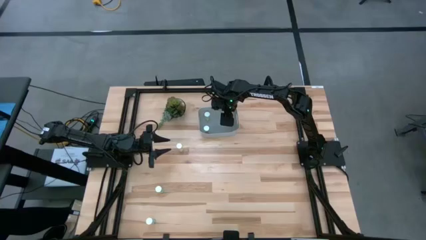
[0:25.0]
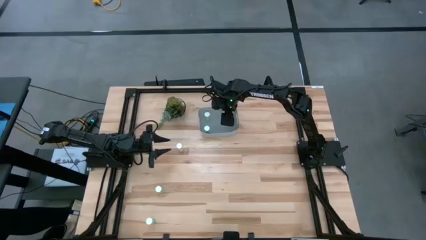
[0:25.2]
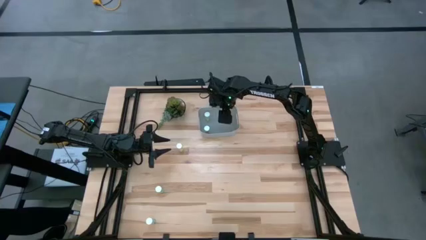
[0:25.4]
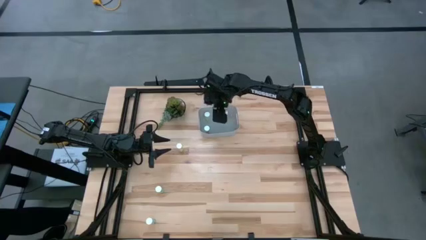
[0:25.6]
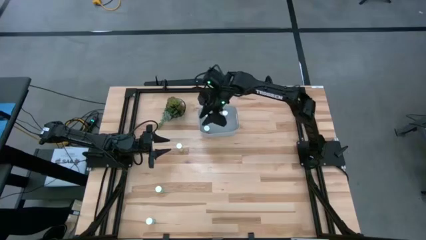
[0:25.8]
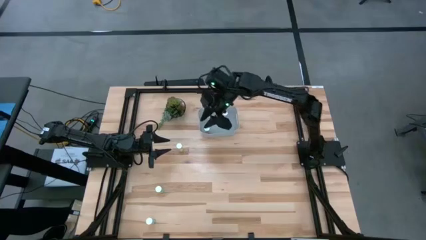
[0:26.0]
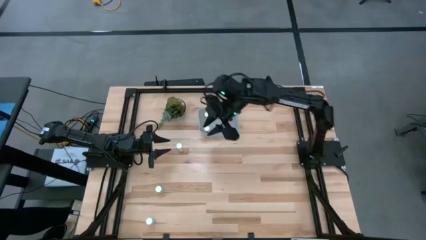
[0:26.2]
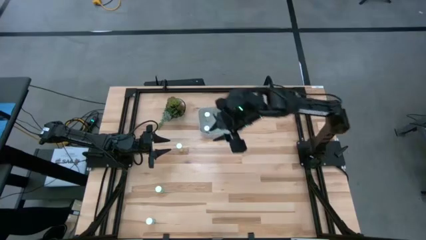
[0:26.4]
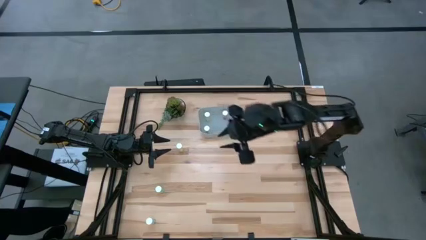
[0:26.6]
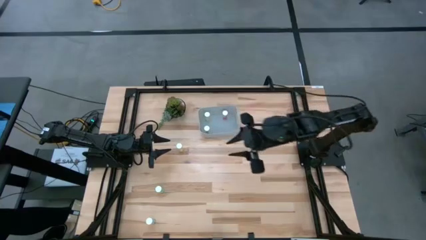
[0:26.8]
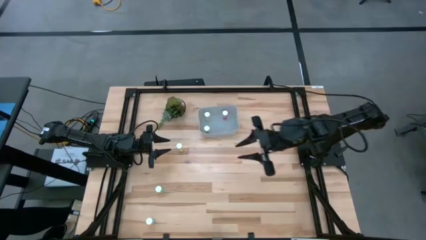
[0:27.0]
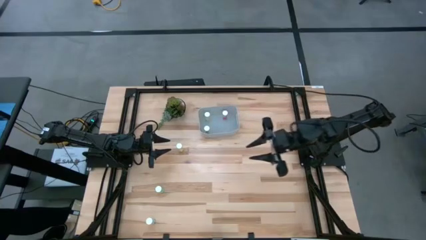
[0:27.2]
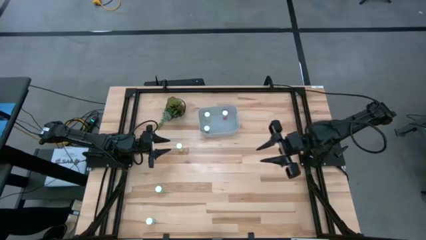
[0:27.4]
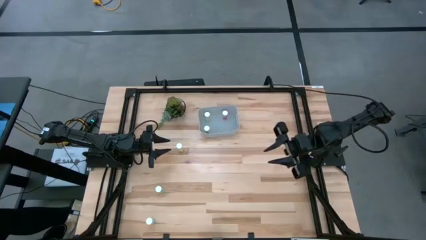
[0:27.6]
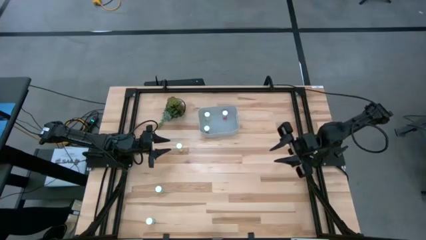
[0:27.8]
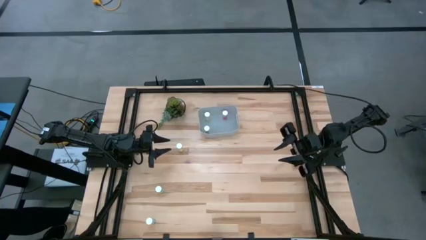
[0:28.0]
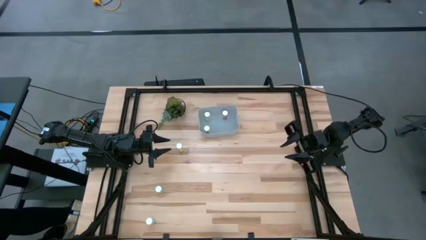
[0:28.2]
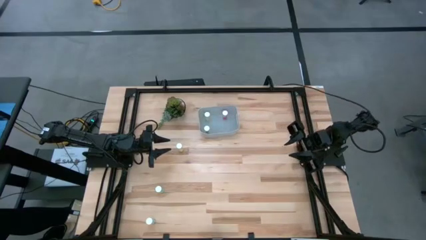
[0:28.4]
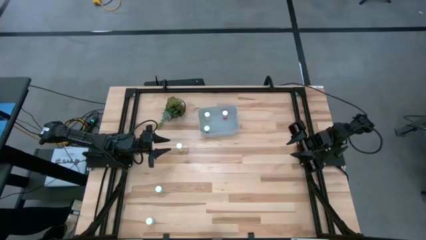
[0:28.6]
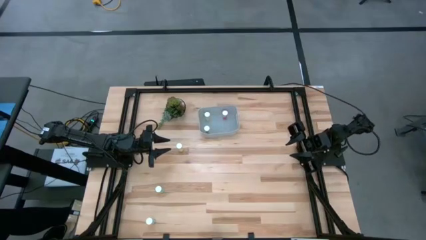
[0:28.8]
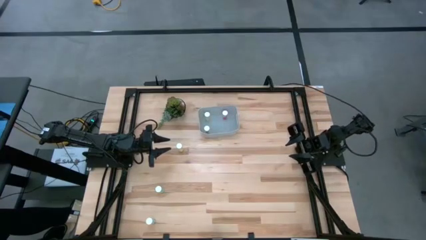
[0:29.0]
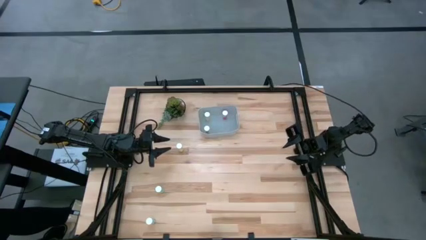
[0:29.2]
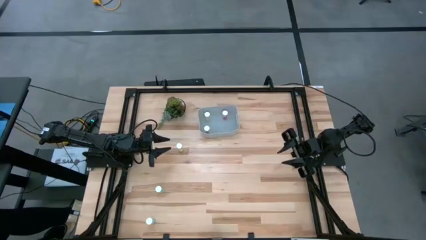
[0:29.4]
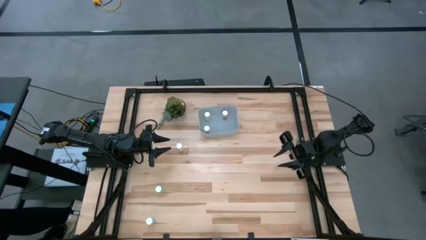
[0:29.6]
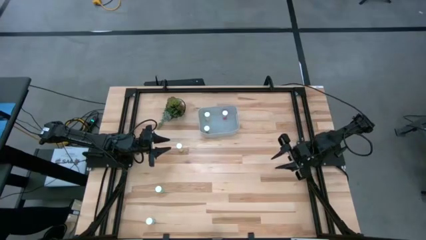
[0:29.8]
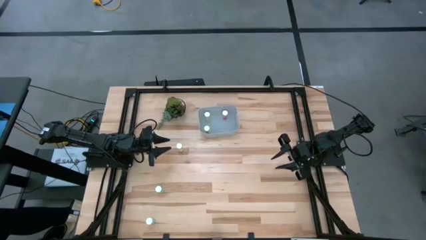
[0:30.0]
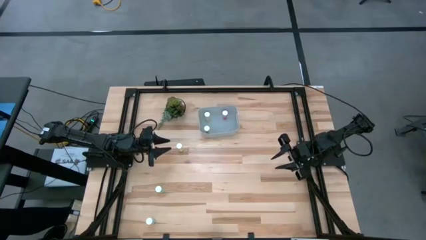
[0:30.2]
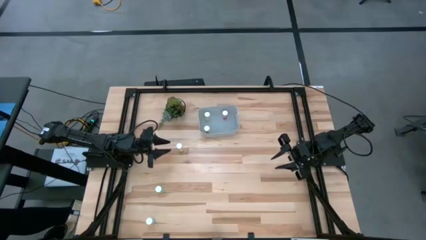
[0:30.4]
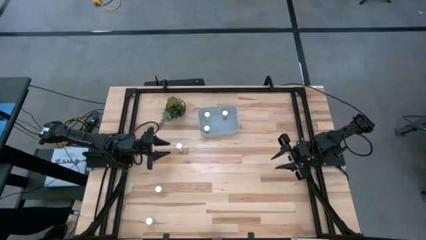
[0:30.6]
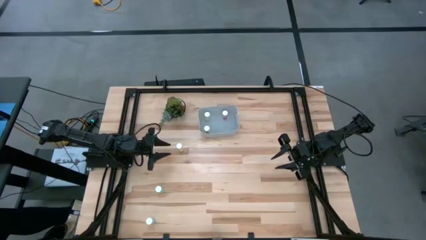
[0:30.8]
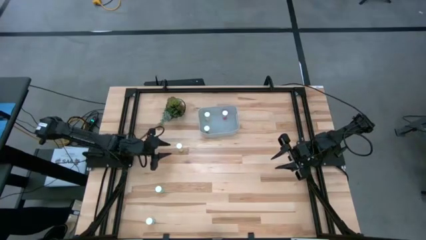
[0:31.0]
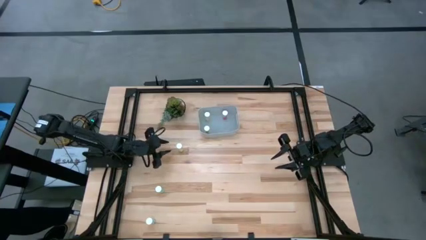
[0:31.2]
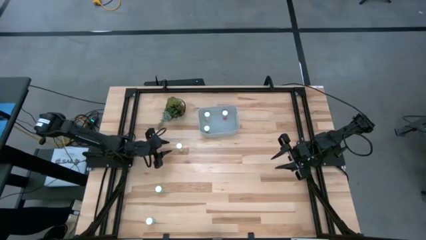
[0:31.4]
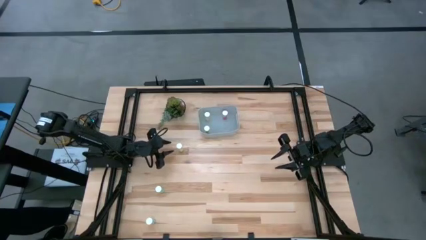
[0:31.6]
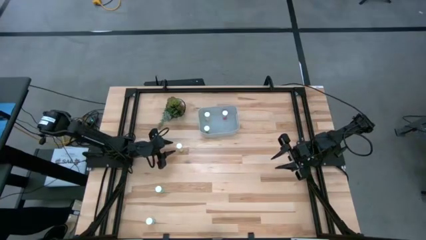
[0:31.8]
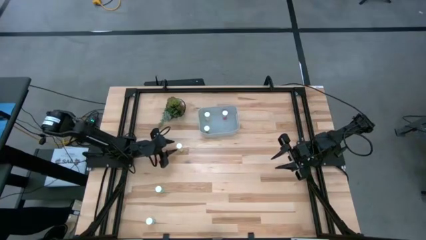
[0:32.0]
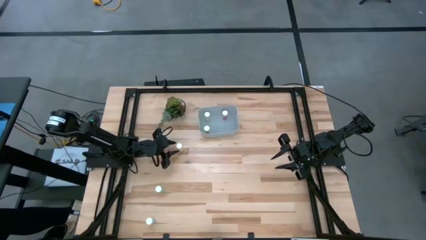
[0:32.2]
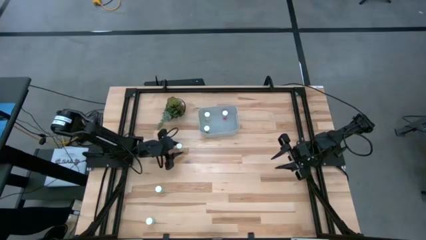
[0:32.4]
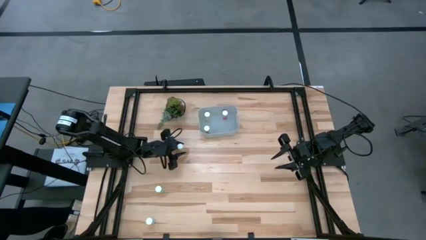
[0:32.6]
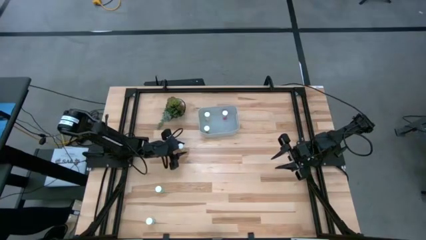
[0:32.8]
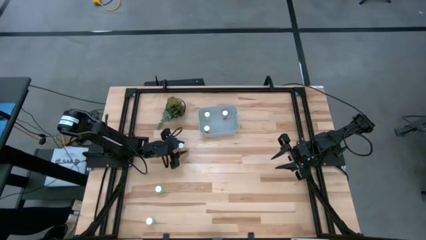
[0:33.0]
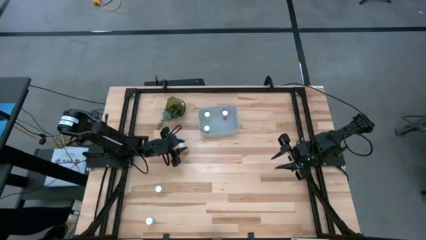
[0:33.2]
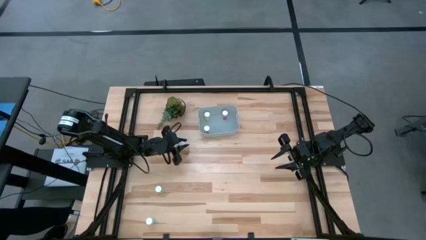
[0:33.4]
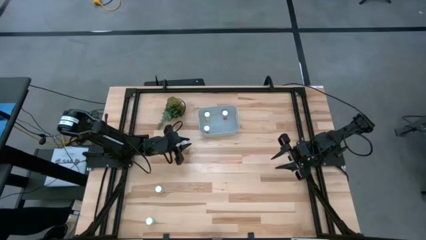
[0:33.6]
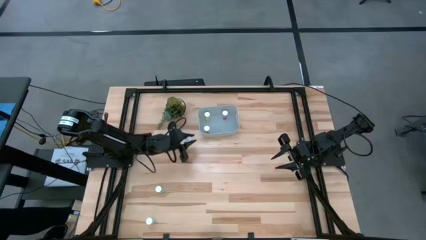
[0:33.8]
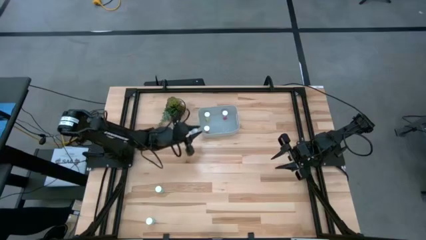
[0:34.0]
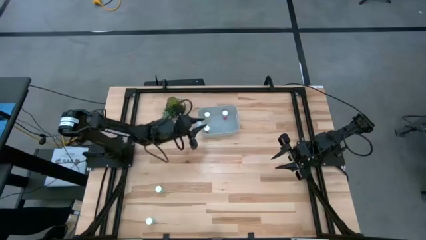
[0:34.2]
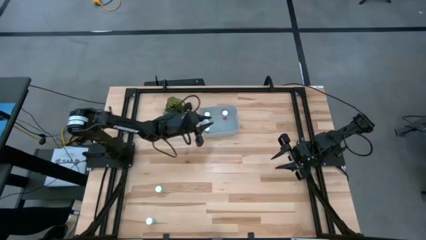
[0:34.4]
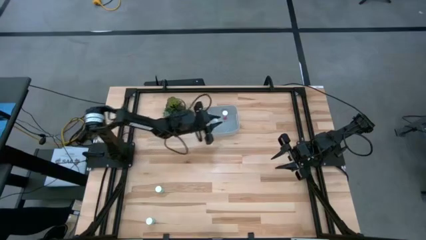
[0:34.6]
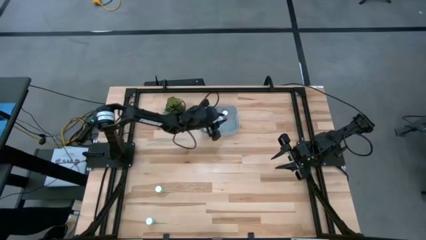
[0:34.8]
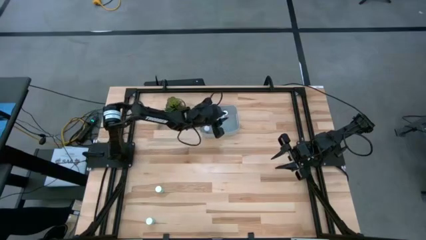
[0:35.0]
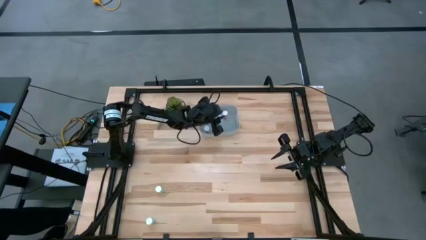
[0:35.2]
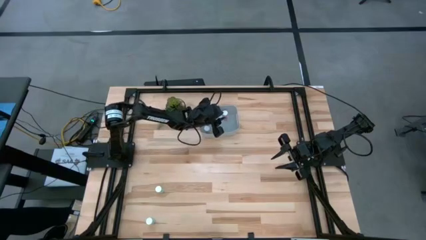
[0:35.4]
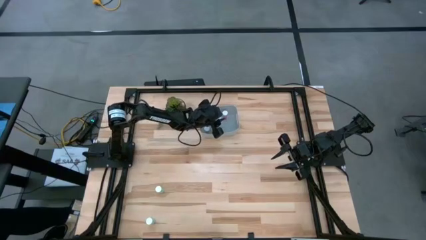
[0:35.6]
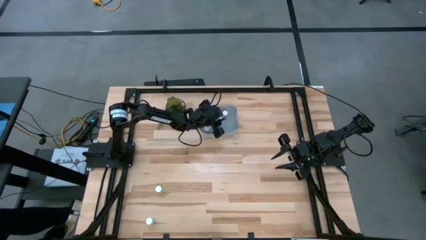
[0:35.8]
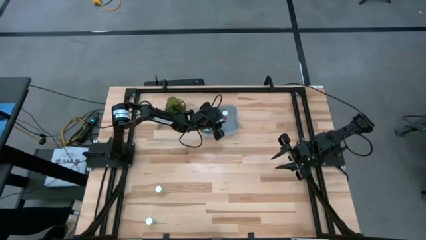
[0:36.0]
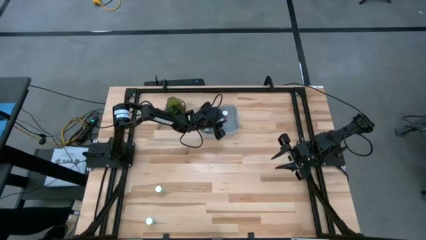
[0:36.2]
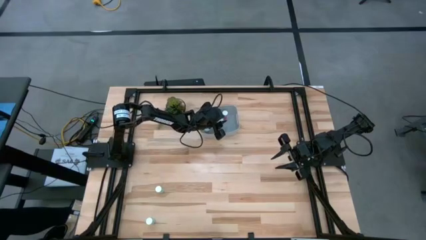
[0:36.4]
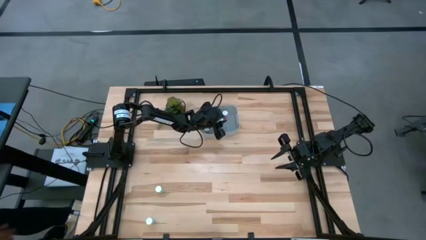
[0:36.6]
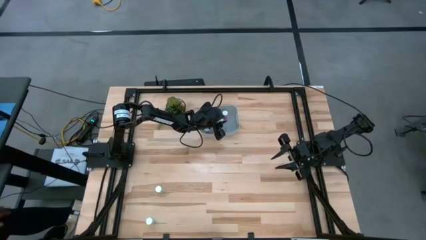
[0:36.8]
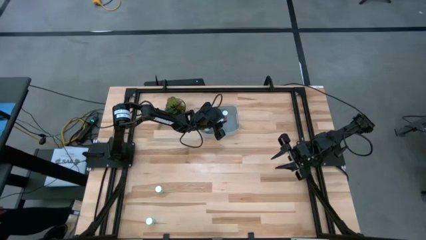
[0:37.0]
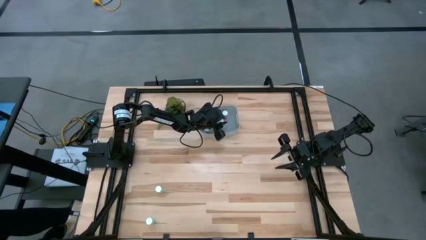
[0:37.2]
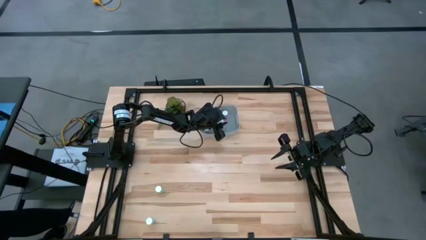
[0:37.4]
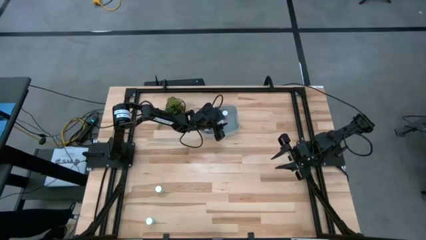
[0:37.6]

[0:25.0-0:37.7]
Task: Pick and place pill bottles into a basket
Put the yellow pill bottle into the bin
